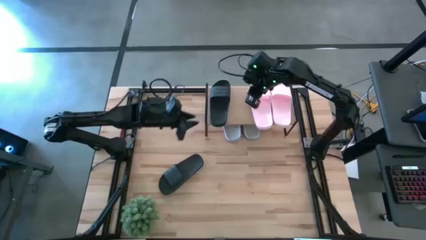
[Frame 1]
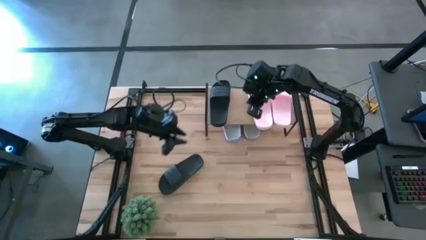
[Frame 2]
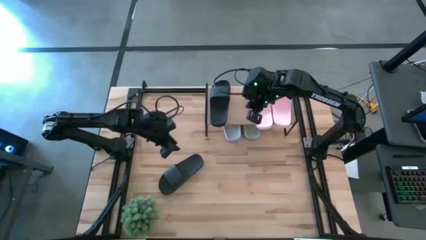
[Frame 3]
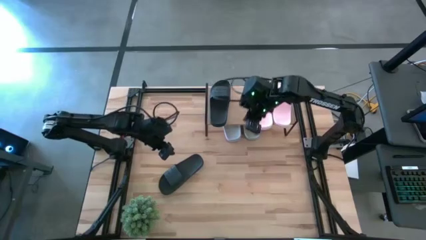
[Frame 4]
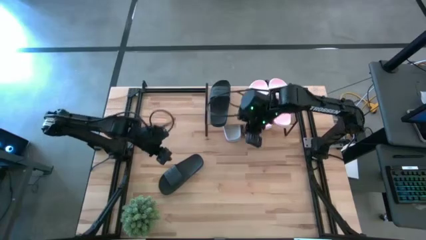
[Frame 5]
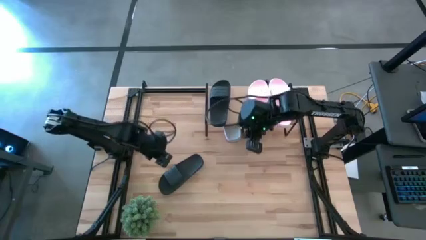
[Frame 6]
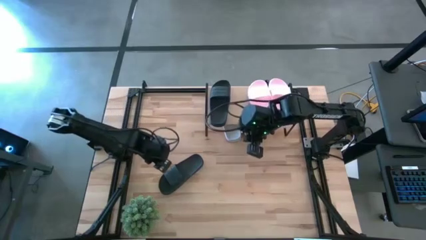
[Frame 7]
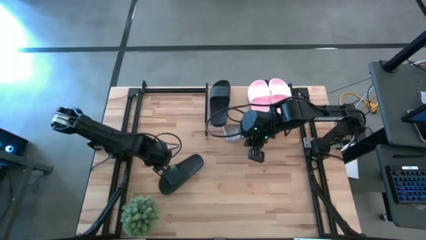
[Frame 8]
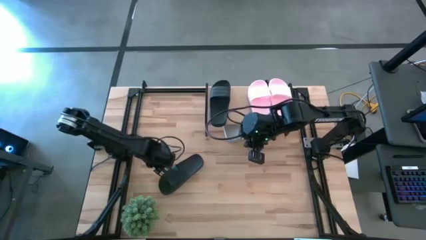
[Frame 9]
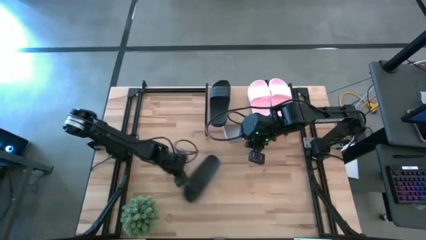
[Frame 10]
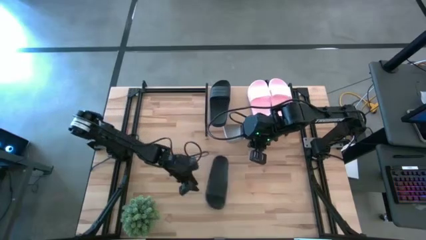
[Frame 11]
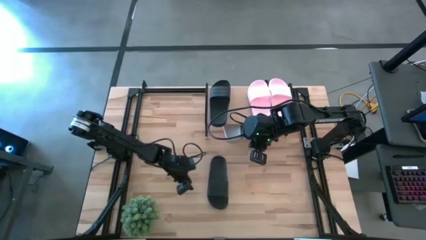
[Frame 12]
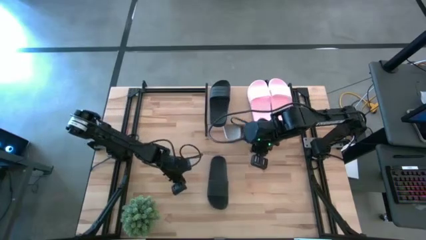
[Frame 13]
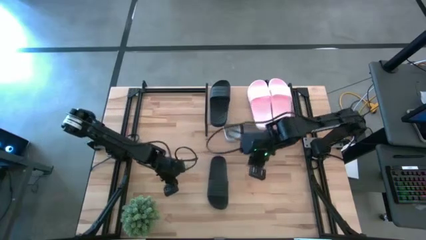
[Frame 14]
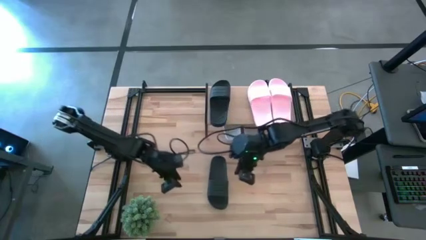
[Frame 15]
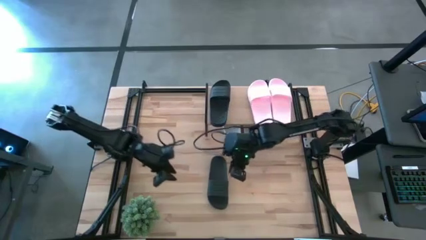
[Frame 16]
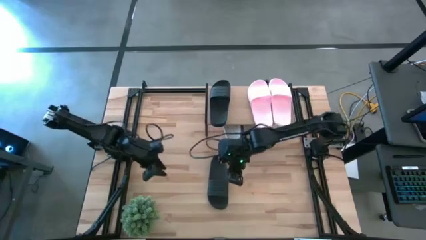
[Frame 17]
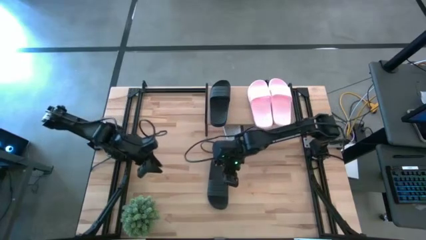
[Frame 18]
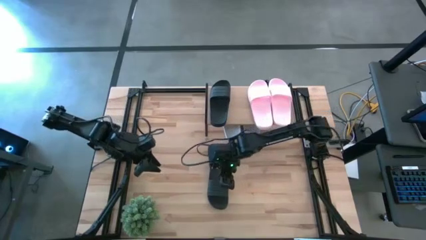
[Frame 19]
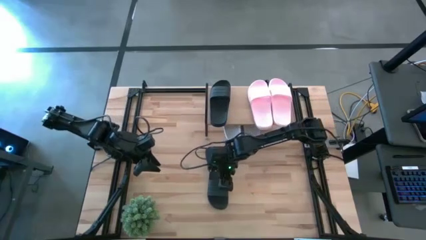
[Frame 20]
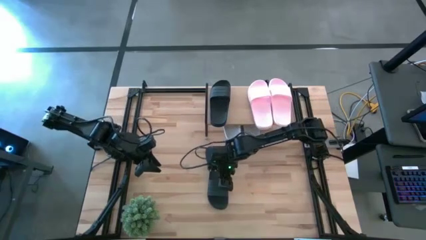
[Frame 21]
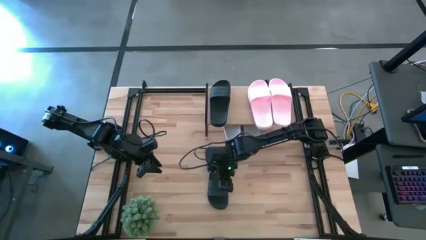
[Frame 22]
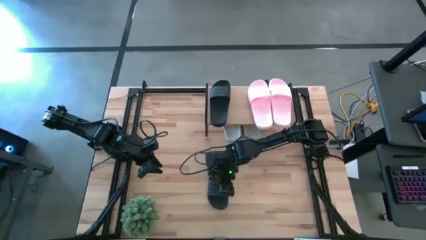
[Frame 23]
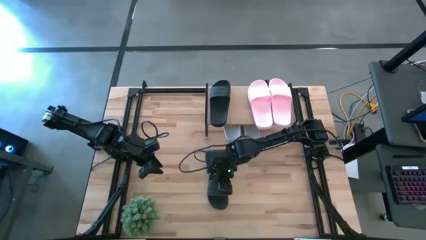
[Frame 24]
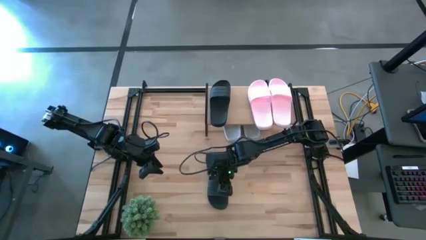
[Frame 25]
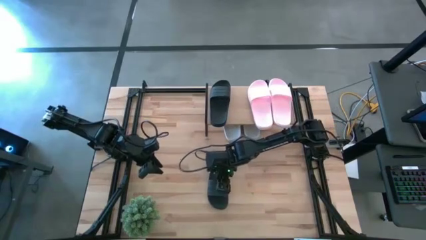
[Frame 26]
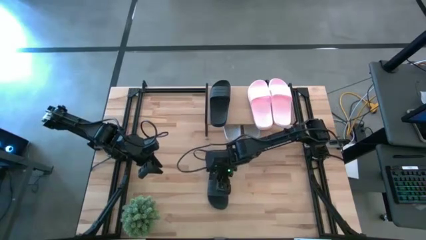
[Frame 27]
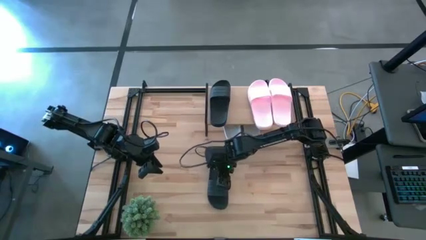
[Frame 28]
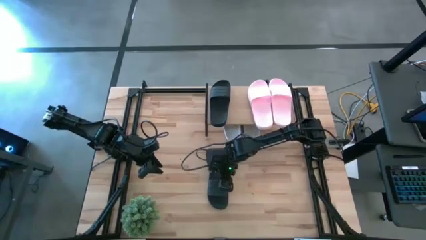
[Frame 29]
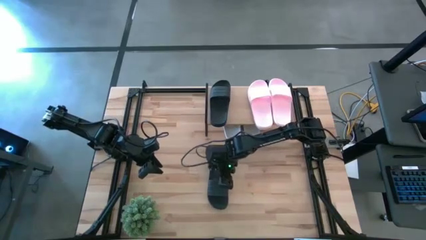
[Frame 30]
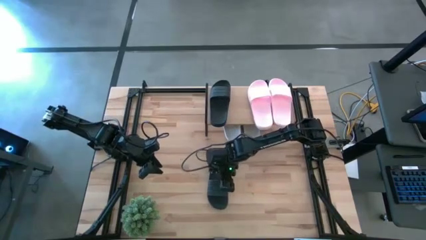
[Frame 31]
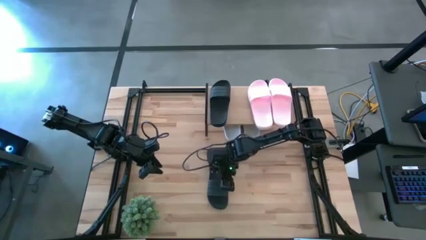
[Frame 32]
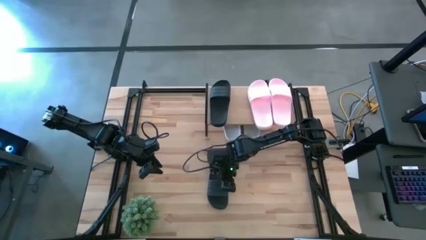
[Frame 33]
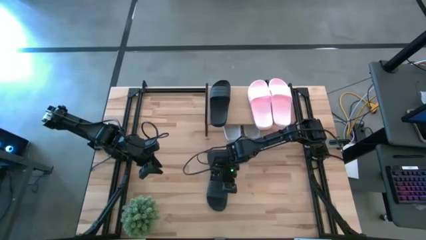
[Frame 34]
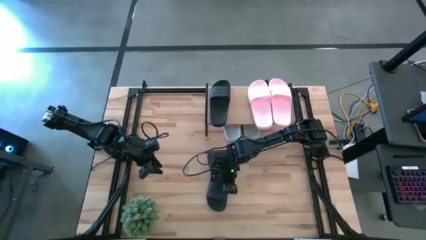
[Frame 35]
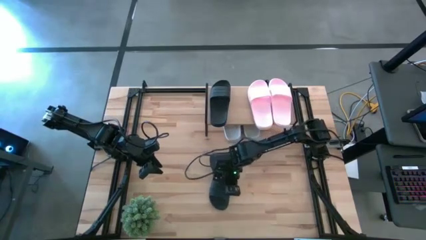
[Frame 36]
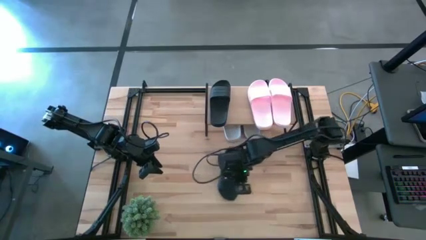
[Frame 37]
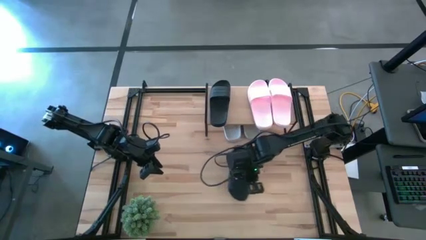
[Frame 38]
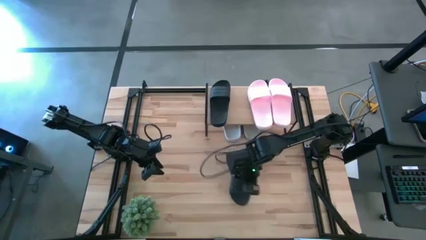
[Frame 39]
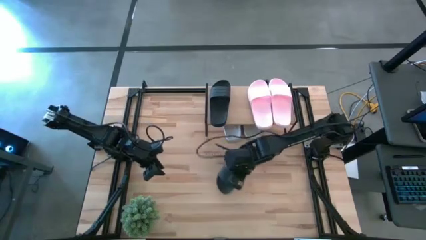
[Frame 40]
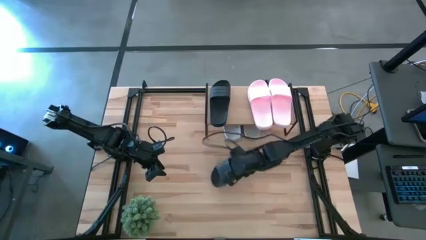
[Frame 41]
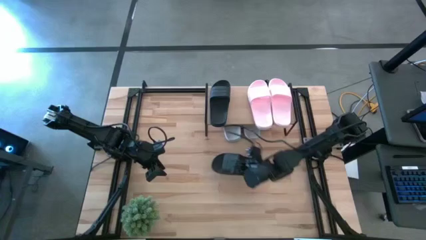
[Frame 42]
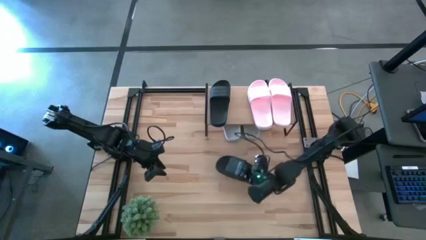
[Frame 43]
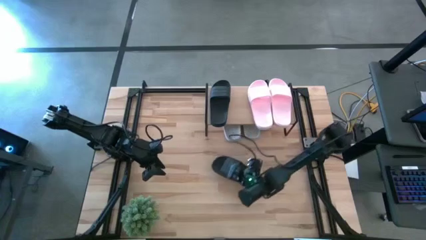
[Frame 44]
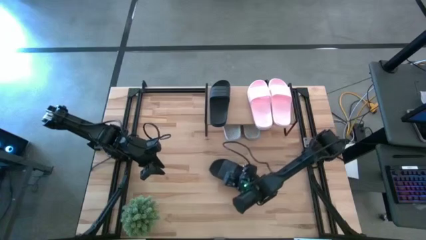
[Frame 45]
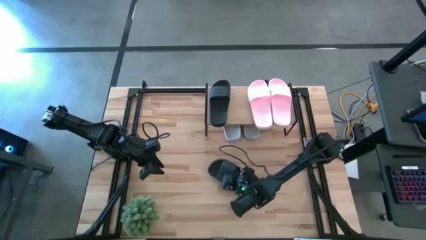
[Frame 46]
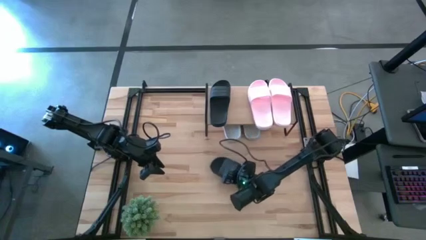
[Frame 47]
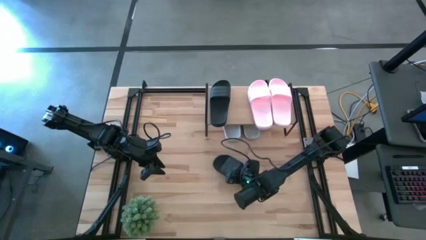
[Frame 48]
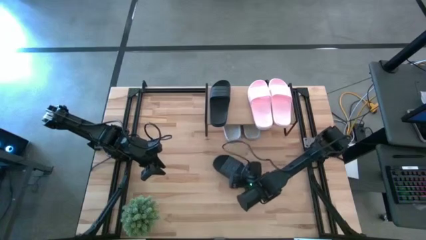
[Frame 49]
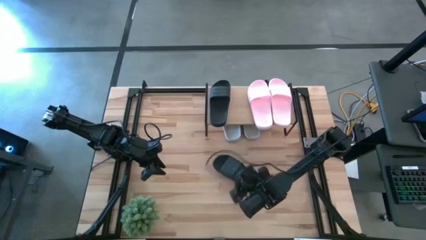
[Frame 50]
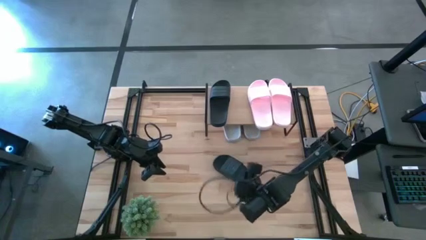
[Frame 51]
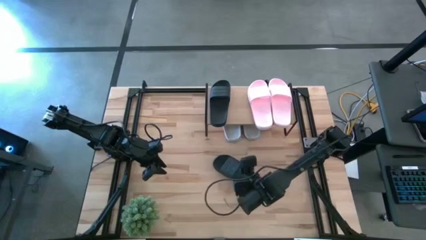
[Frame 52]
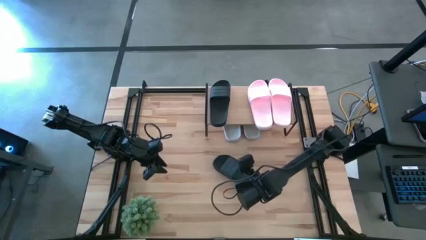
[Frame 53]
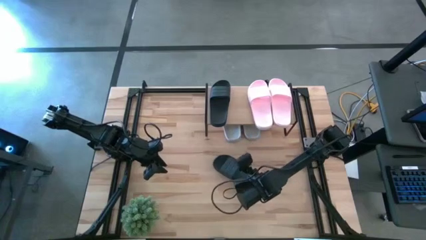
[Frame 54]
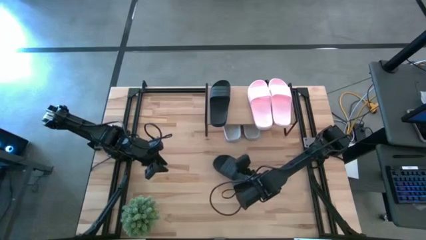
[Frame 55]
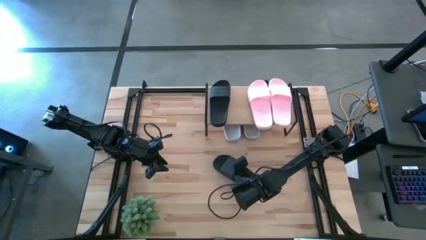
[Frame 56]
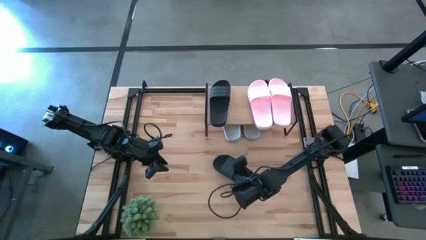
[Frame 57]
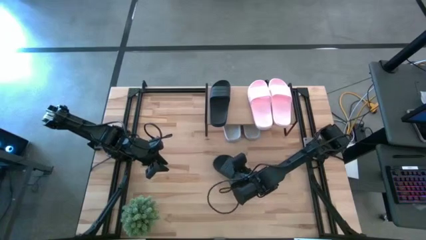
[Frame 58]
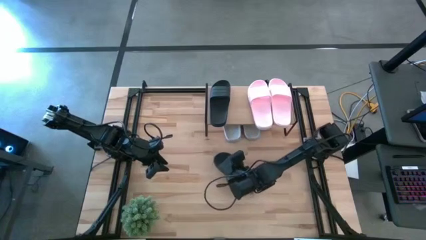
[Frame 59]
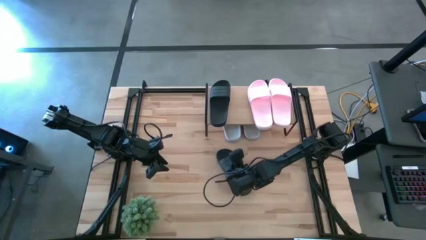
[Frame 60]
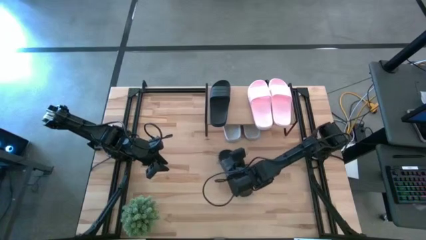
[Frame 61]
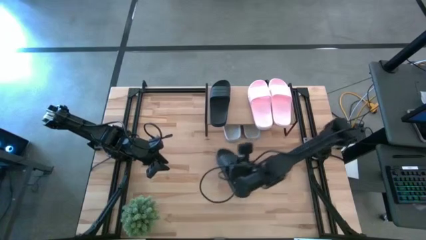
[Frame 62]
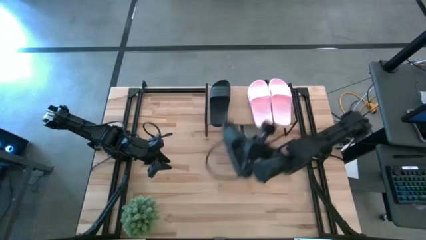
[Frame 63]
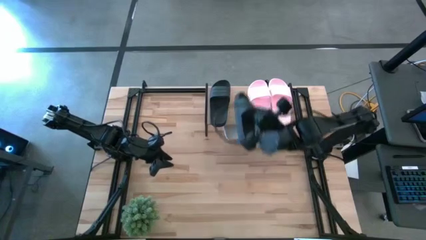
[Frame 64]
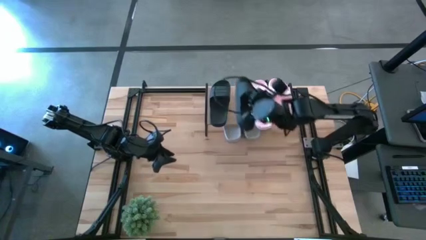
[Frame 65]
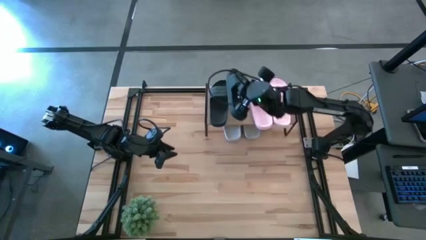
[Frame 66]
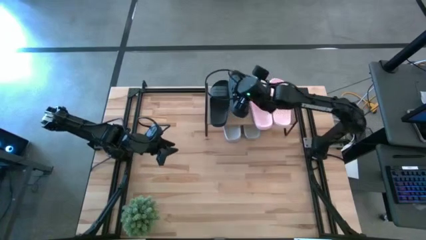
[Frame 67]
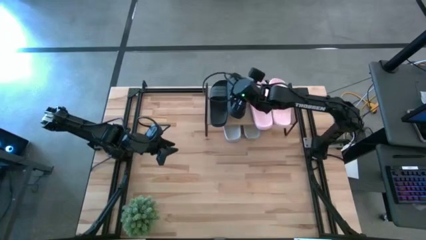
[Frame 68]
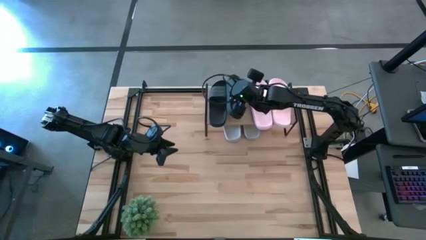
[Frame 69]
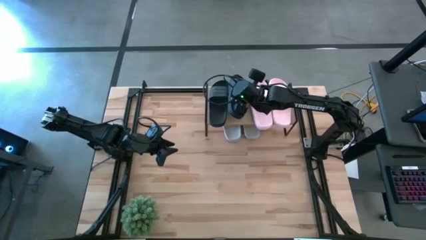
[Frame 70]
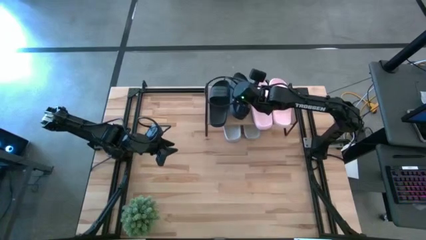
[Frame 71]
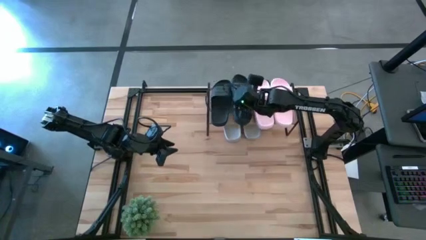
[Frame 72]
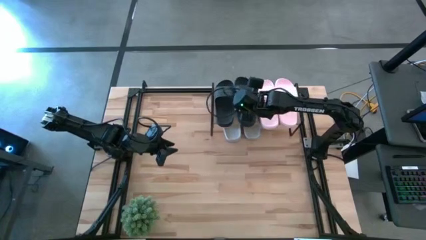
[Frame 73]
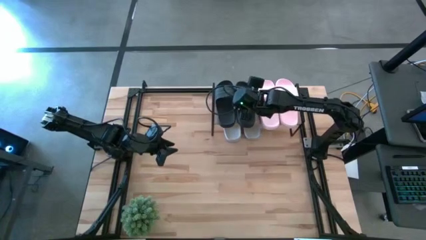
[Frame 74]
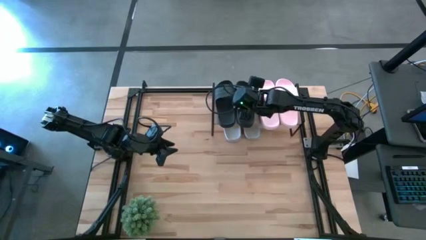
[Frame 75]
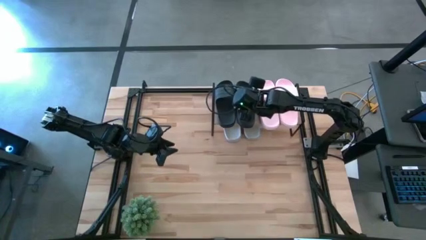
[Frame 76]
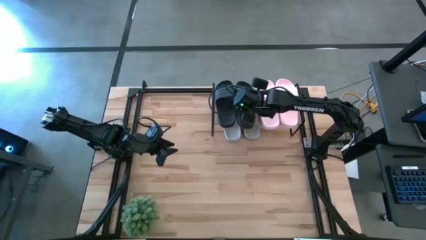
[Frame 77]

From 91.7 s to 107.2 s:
Task: Pick and place slides into the shelf
Put the black slide on the shelf
